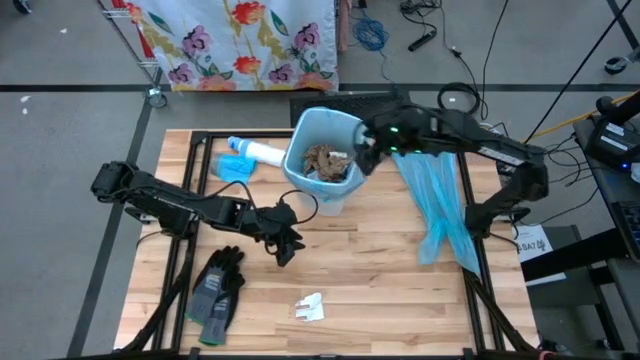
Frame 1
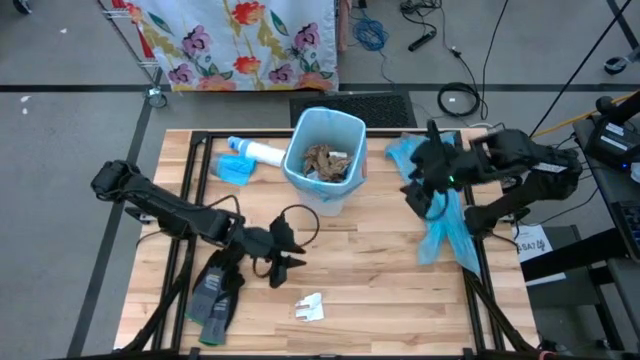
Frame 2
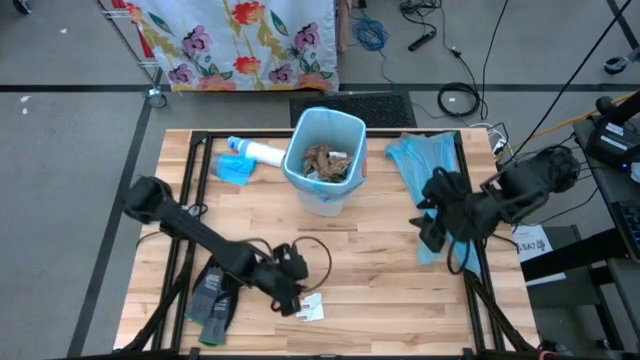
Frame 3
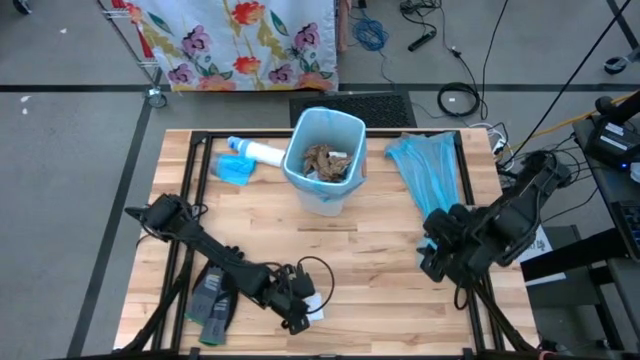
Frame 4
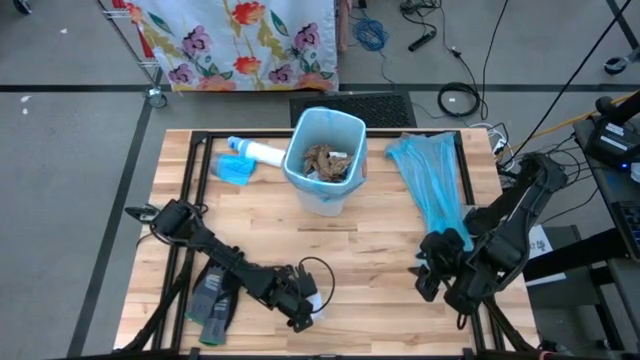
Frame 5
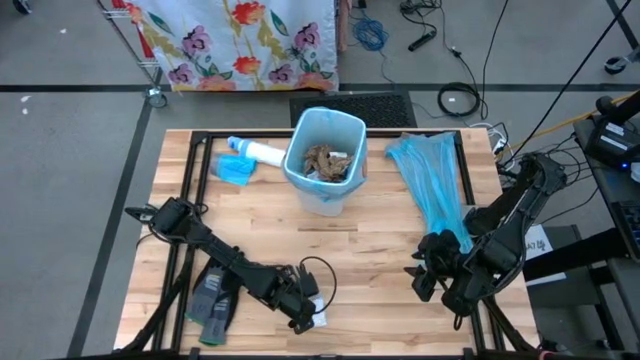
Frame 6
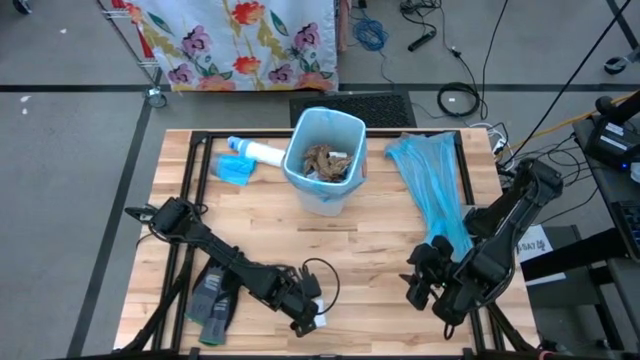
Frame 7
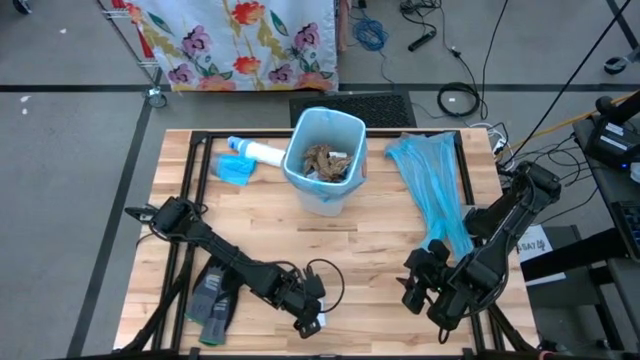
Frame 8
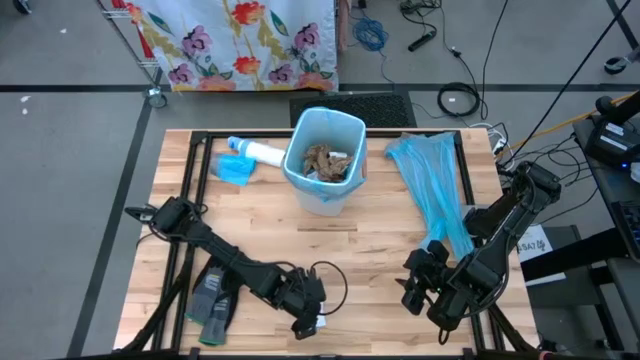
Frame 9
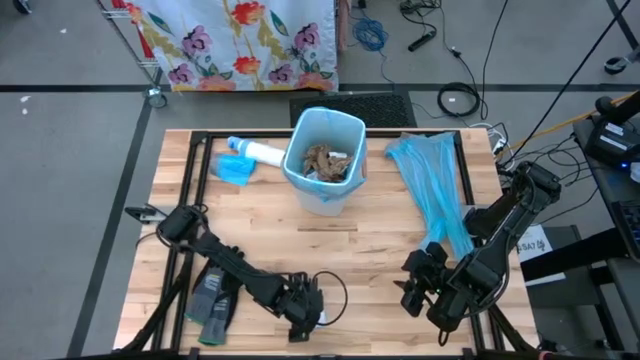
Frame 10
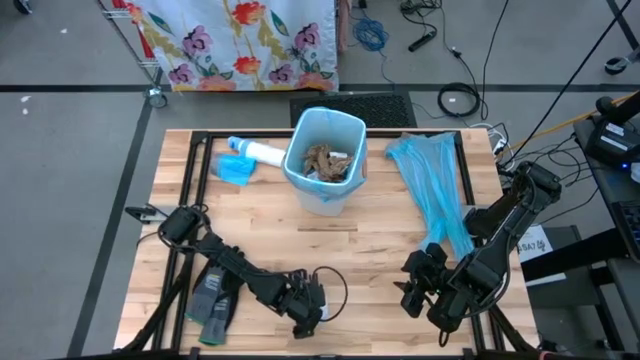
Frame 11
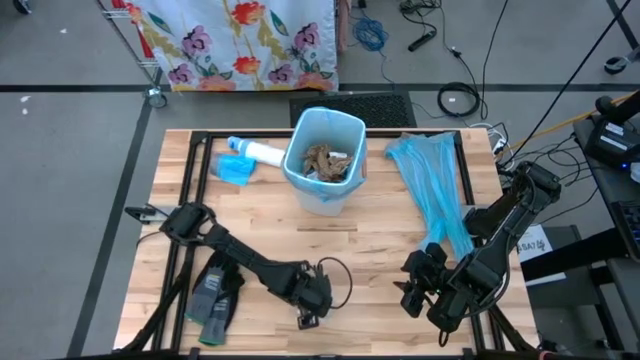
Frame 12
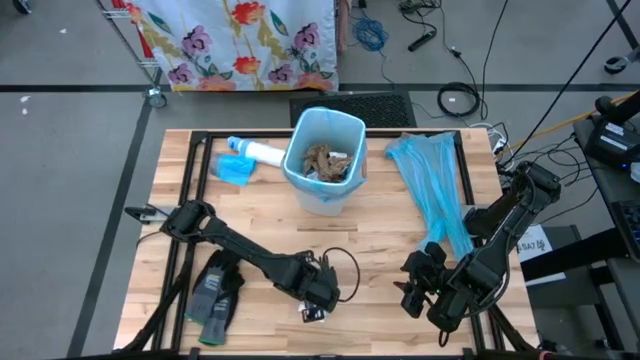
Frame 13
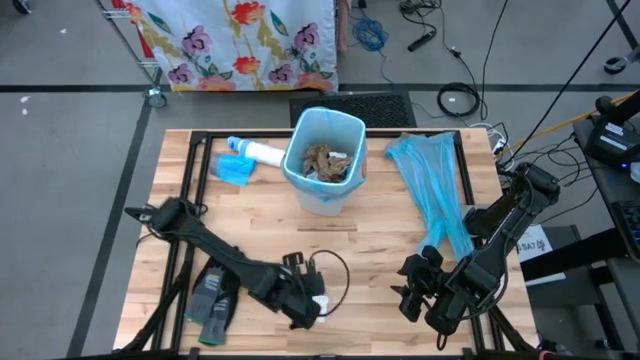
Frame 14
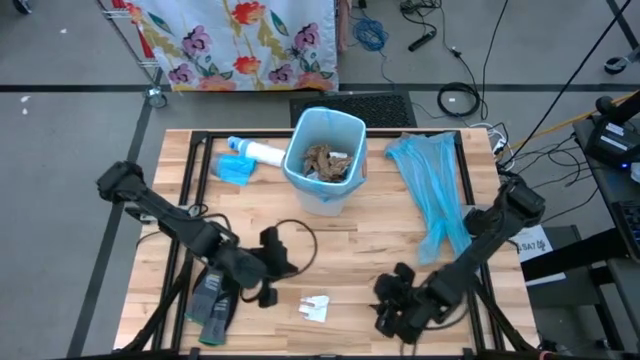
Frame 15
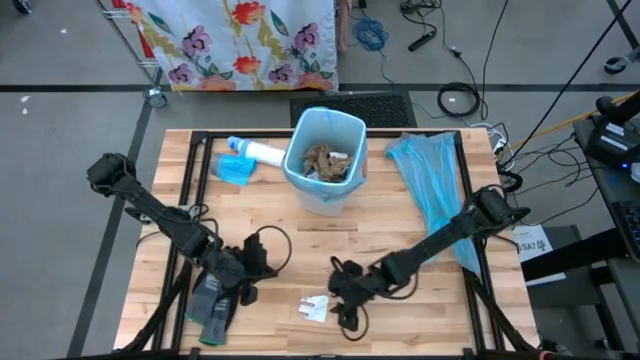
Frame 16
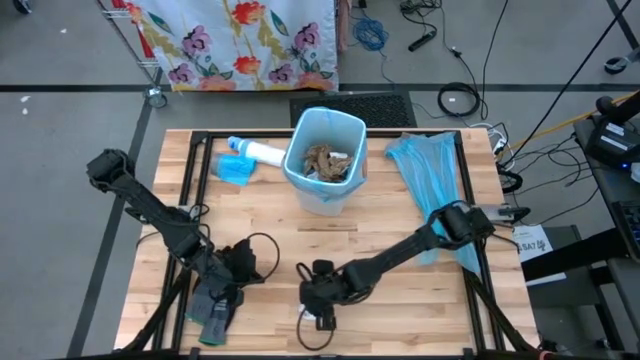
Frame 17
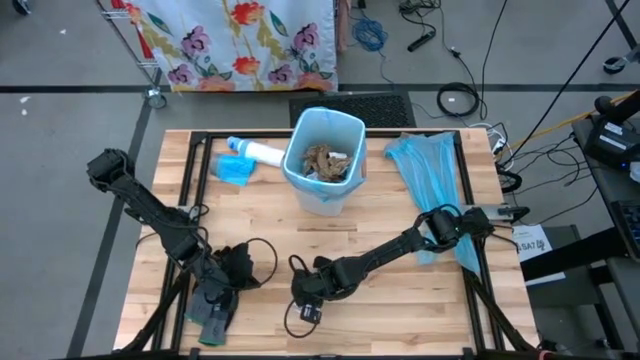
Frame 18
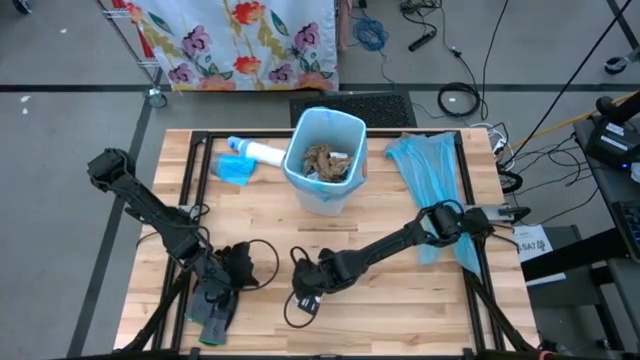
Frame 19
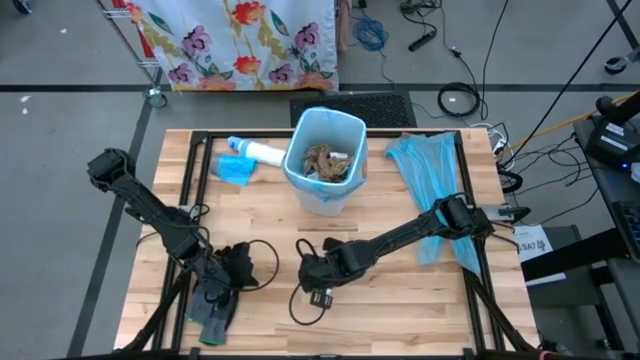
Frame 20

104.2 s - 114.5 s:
Task: place trash/remove bag and relplace
Put the white paper into the trash bin

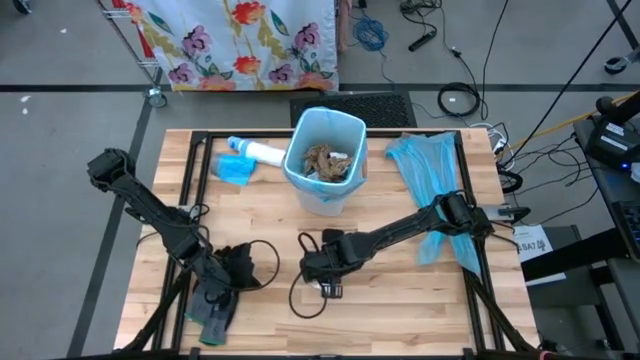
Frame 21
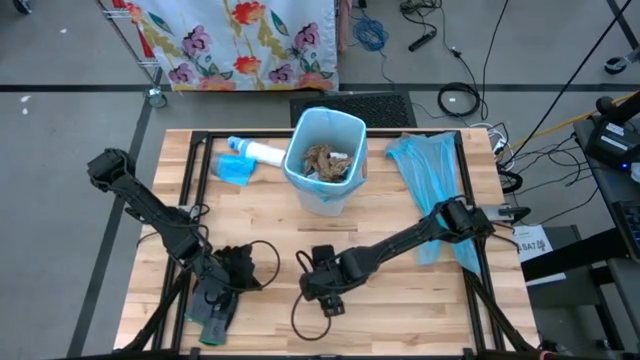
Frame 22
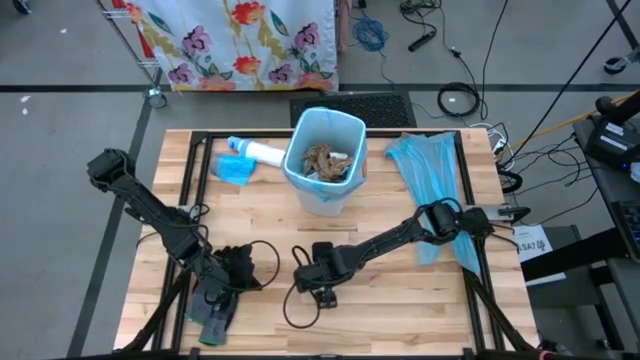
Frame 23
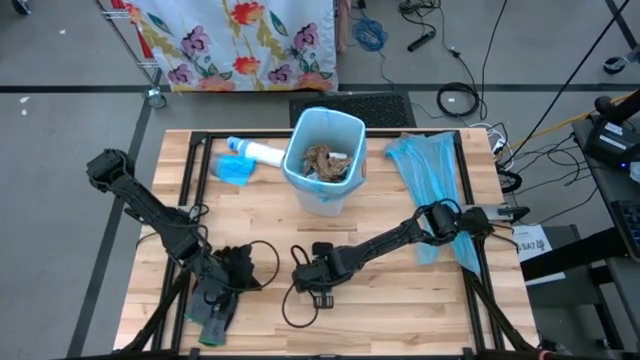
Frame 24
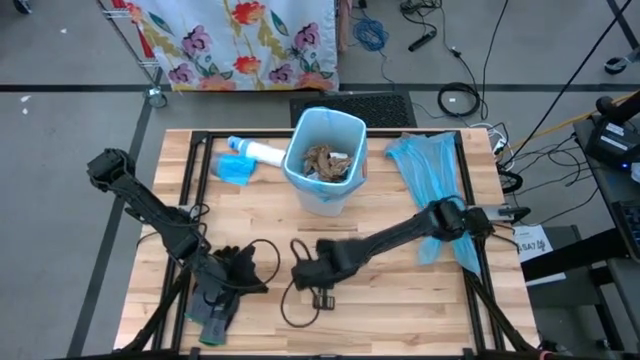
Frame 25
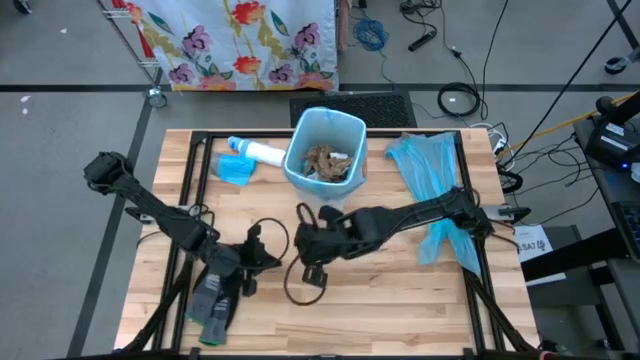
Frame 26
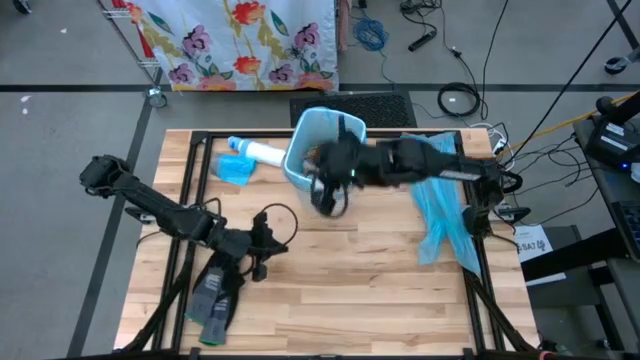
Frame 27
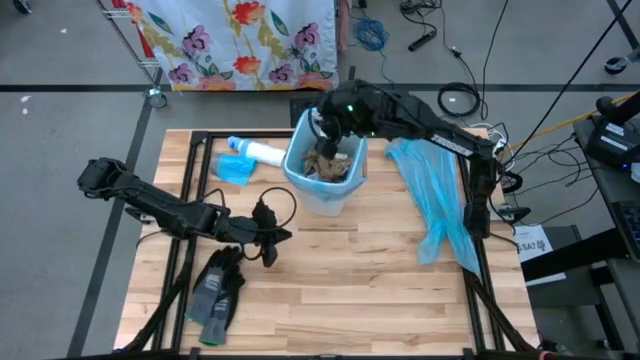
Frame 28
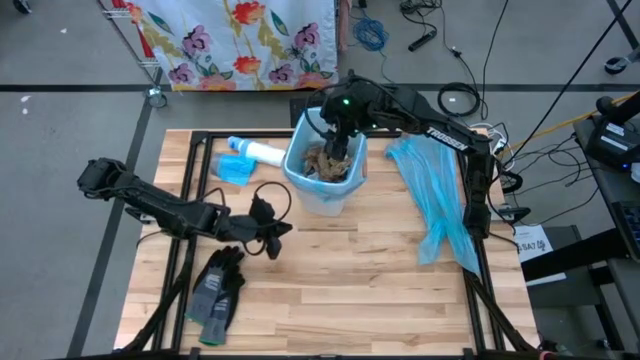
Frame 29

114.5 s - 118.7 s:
Put the white paper into the trash bin

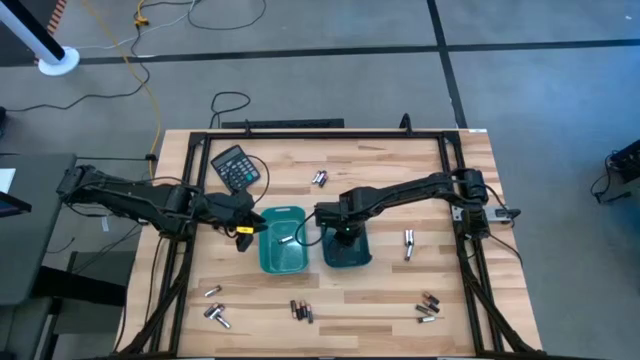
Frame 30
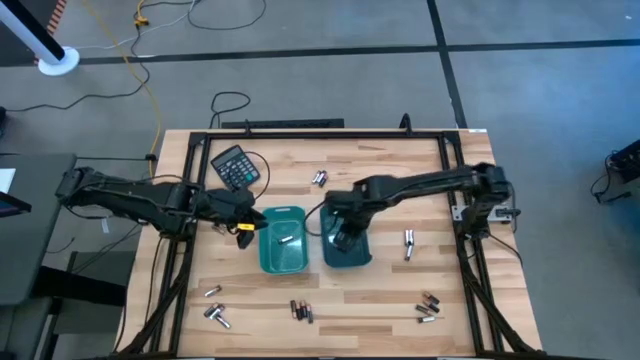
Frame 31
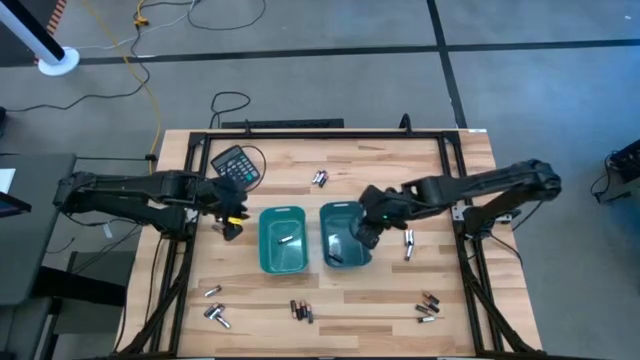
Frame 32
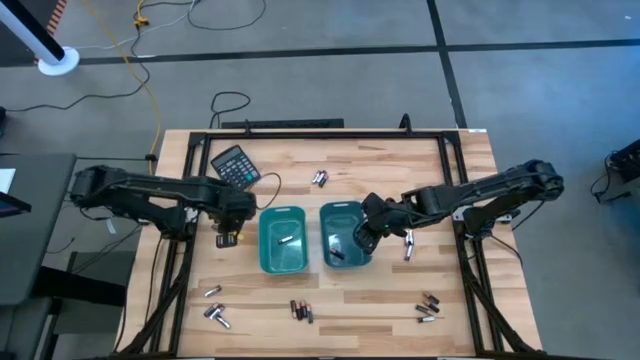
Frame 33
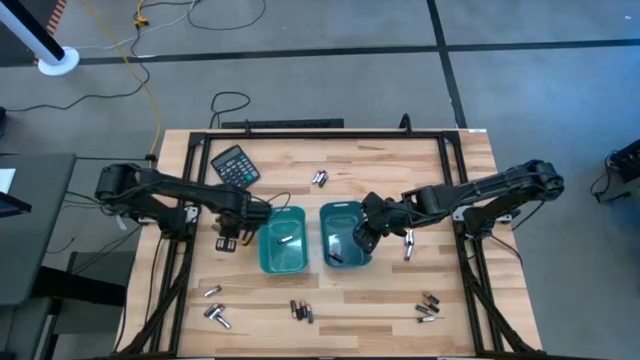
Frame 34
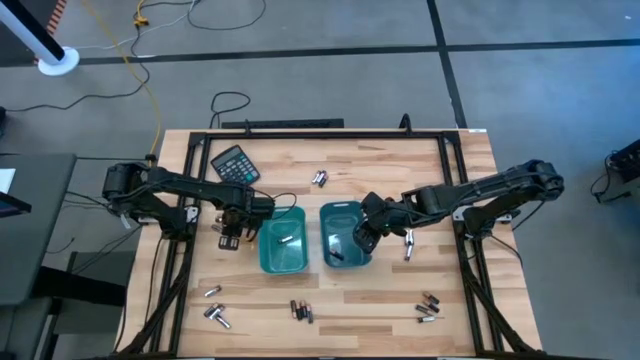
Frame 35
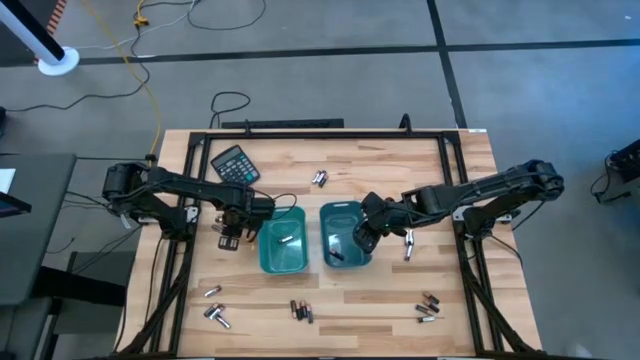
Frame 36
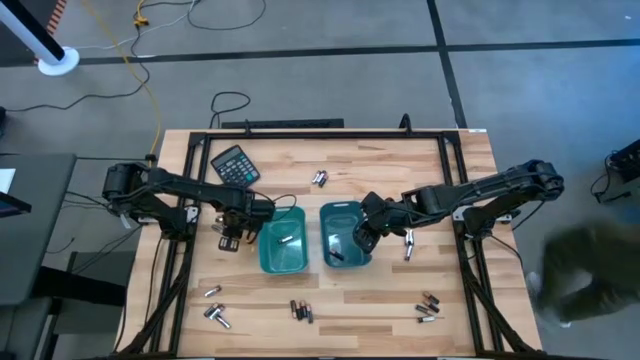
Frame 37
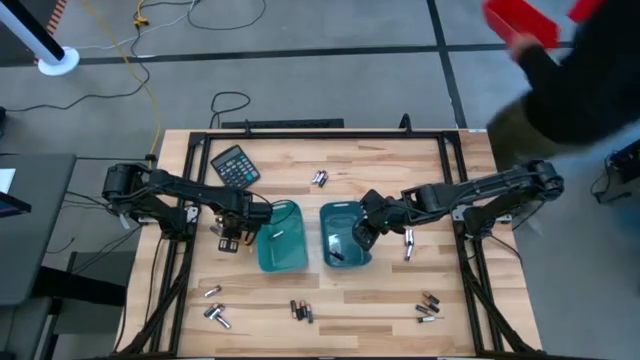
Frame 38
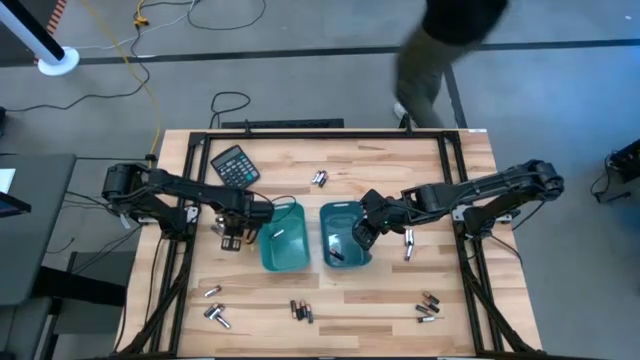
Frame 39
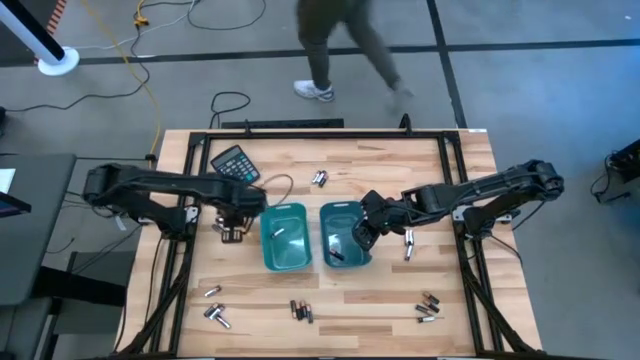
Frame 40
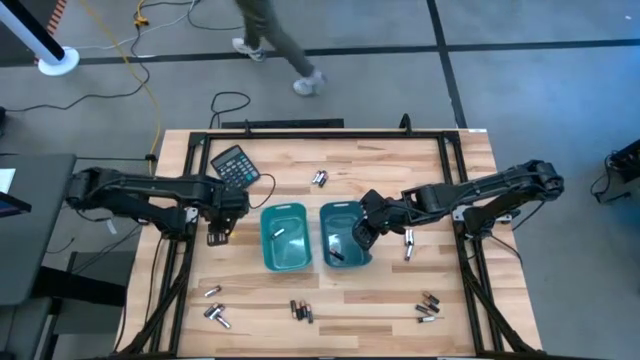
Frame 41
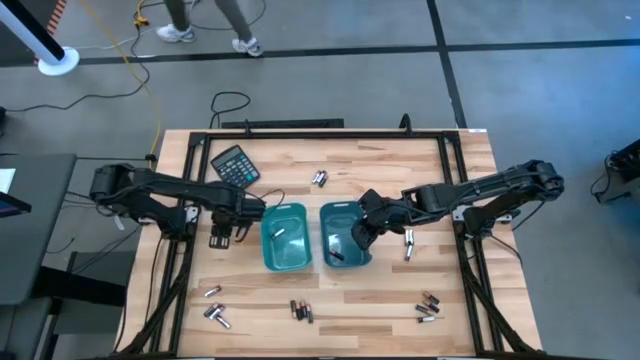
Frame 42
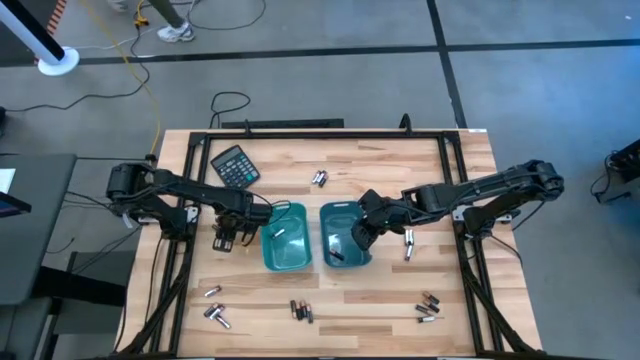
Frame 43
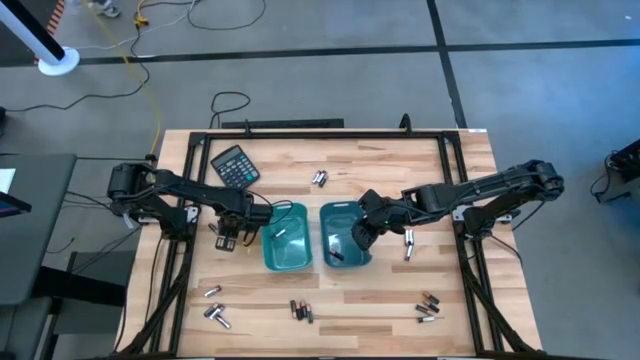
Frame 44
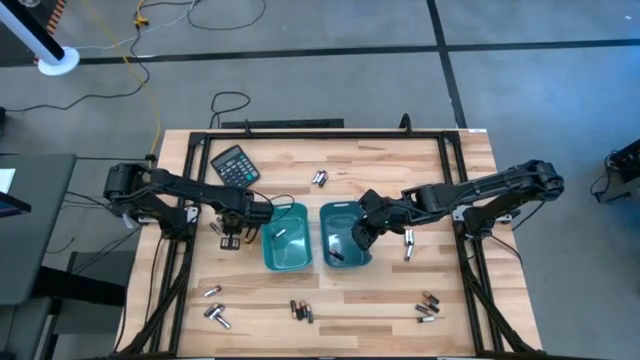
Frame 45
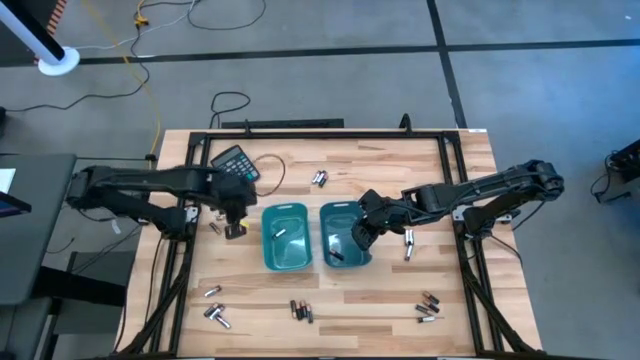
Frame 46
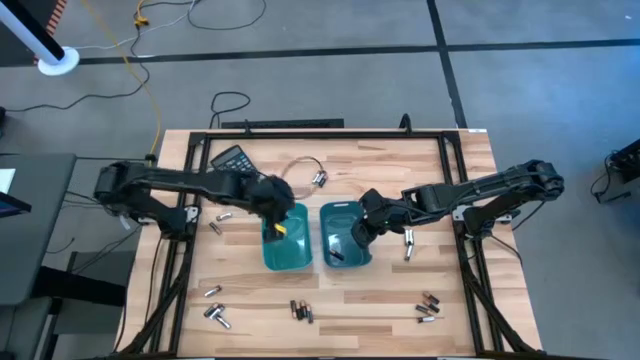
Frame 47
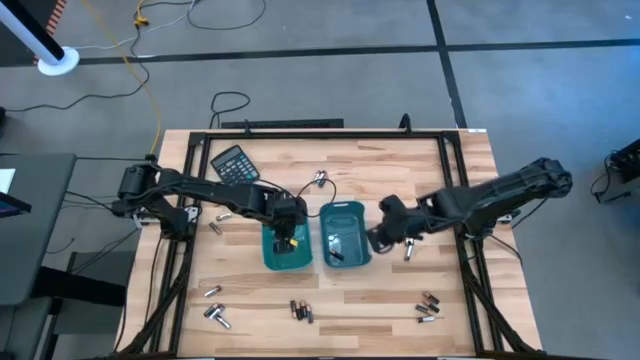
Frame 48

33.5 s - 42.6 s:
Task: Sort batteries
Put the silver battery into the green bin
